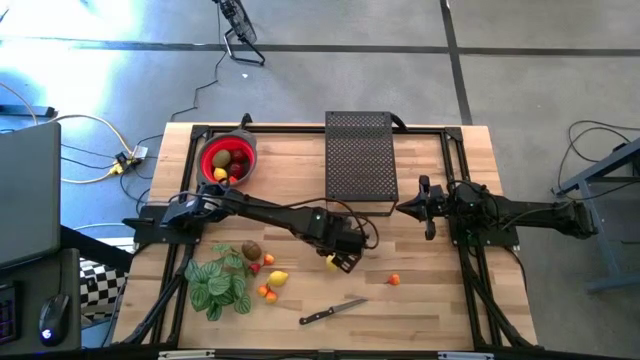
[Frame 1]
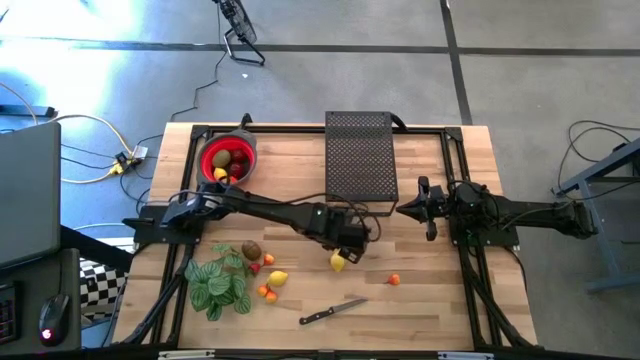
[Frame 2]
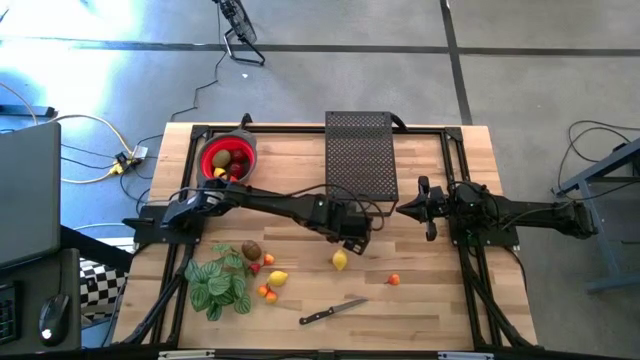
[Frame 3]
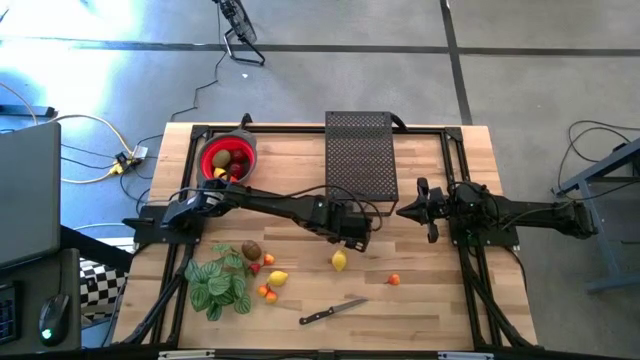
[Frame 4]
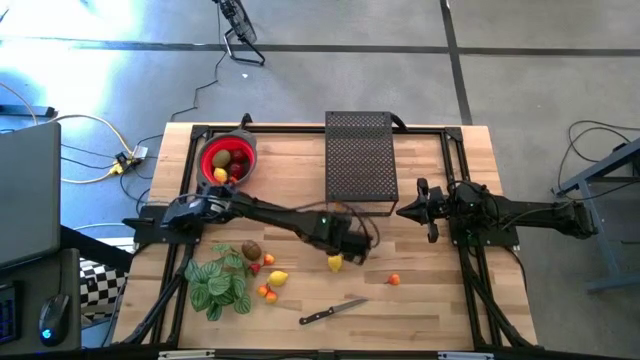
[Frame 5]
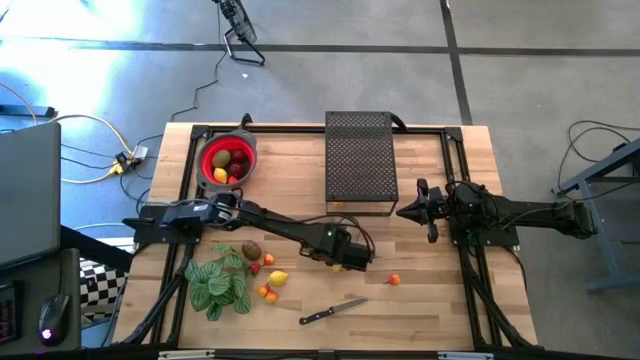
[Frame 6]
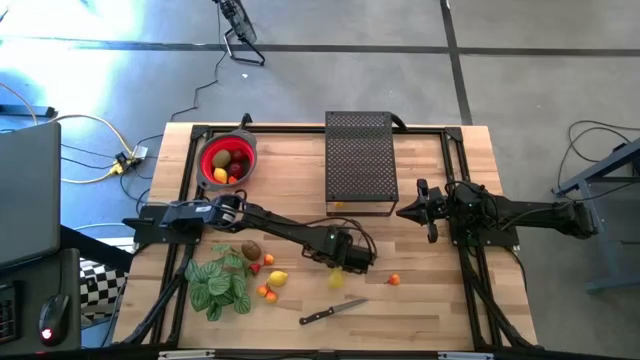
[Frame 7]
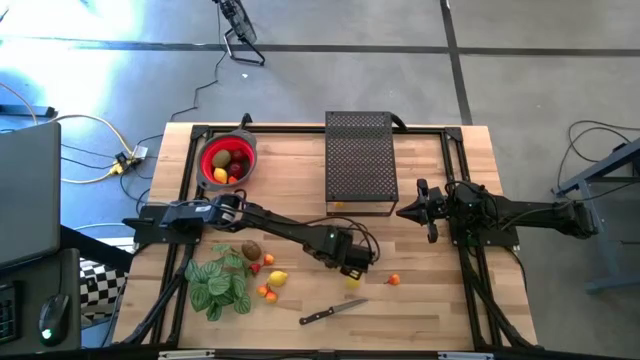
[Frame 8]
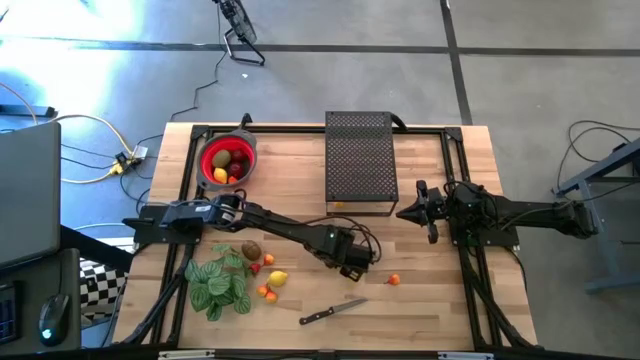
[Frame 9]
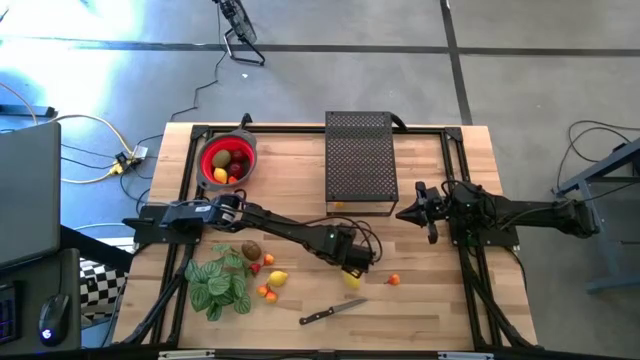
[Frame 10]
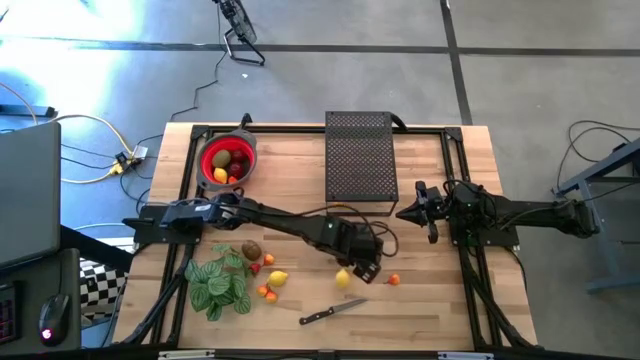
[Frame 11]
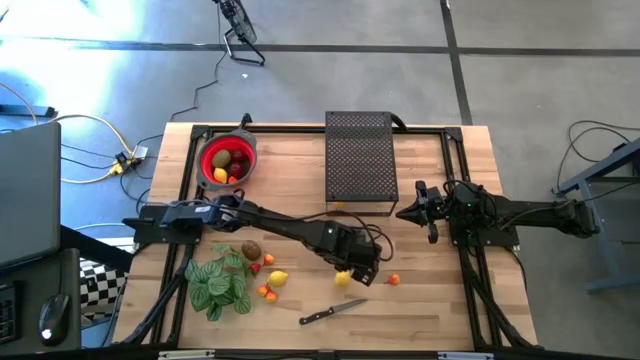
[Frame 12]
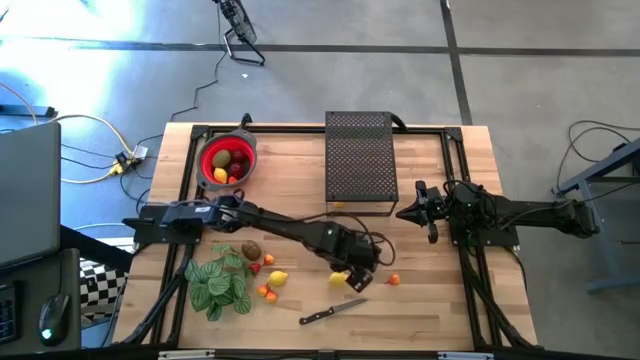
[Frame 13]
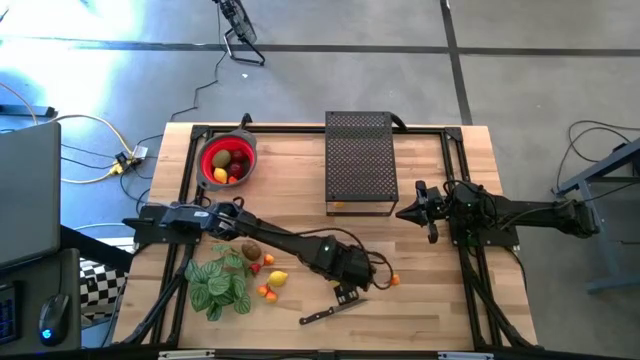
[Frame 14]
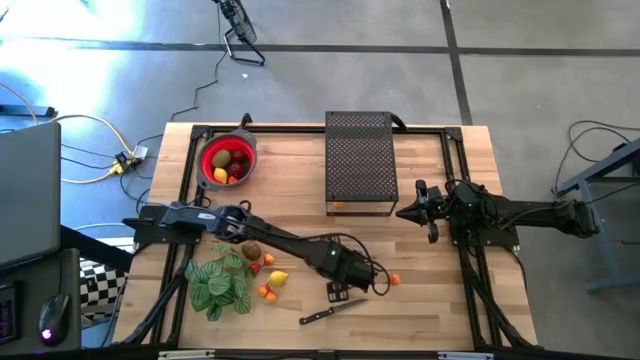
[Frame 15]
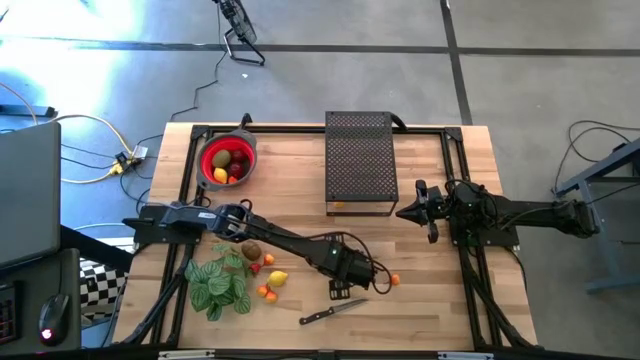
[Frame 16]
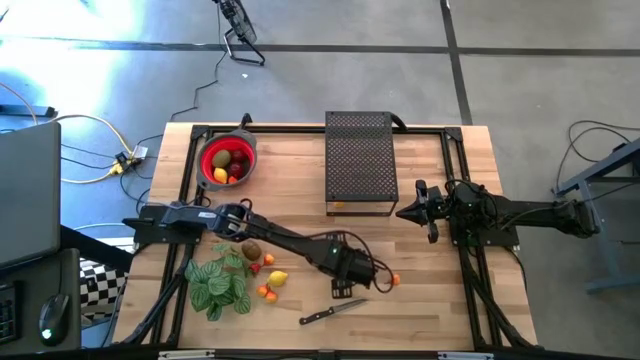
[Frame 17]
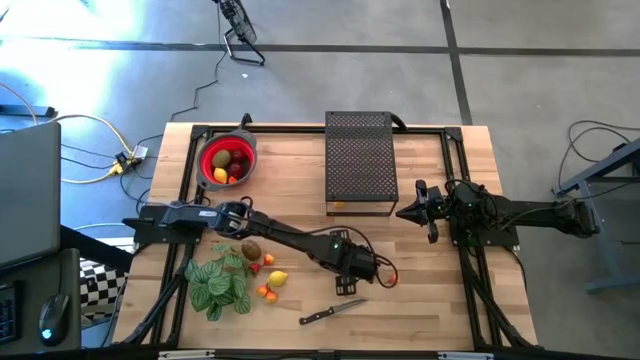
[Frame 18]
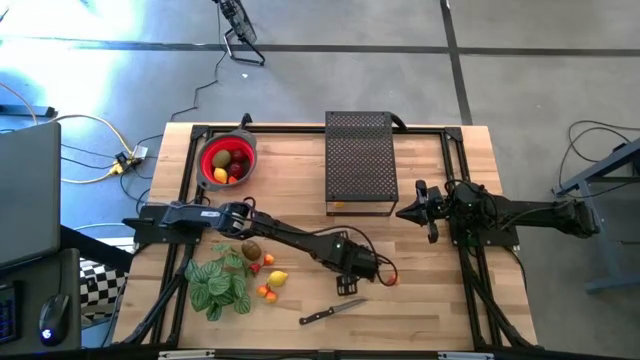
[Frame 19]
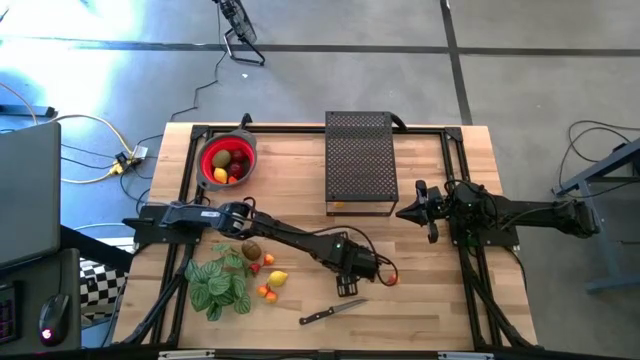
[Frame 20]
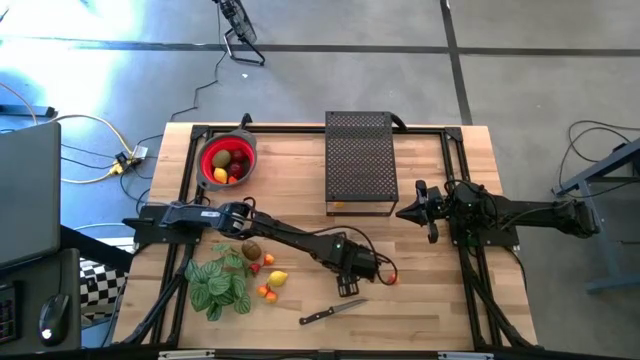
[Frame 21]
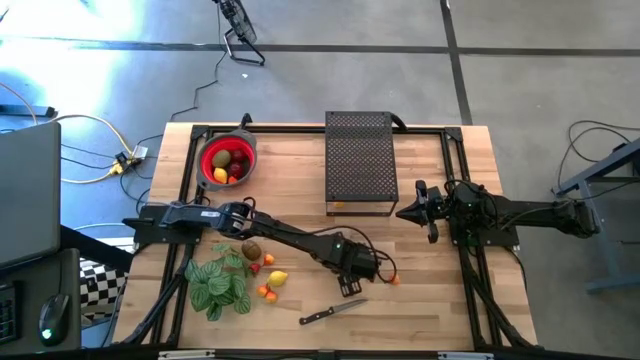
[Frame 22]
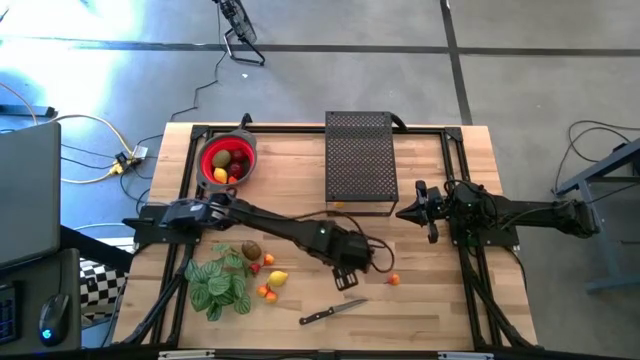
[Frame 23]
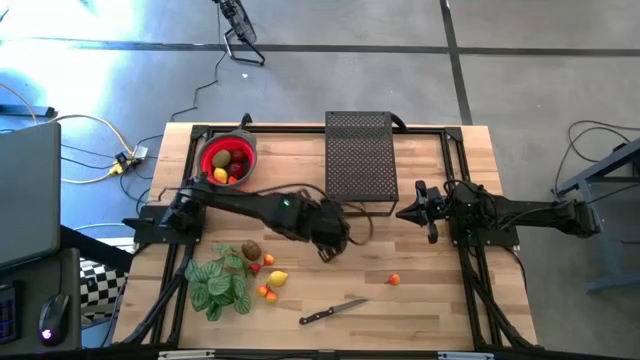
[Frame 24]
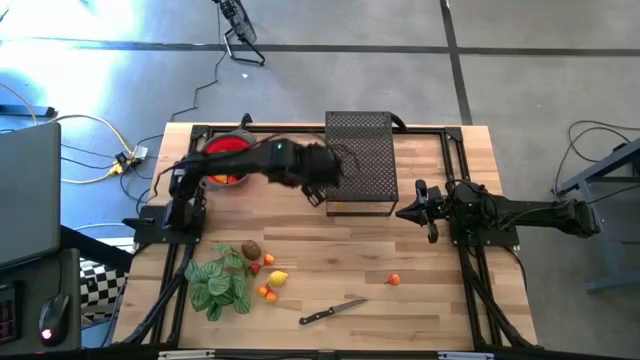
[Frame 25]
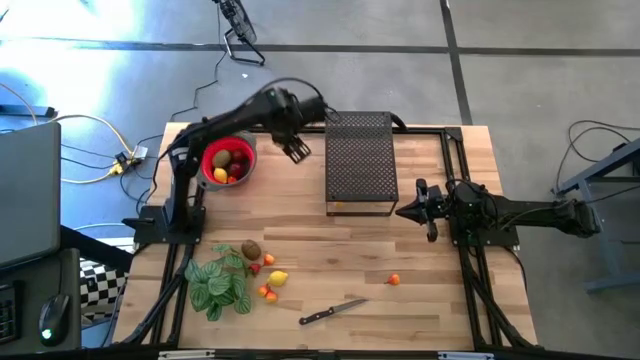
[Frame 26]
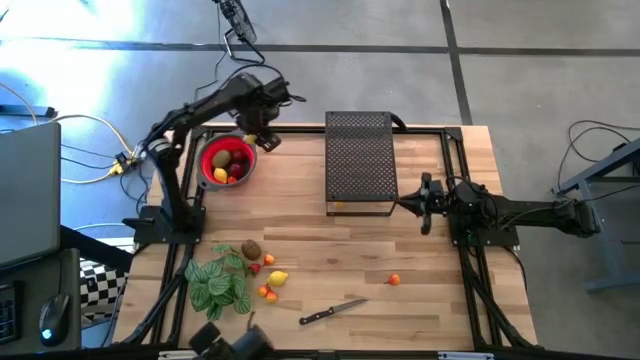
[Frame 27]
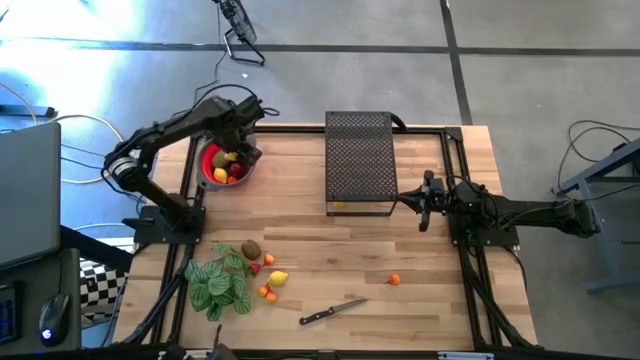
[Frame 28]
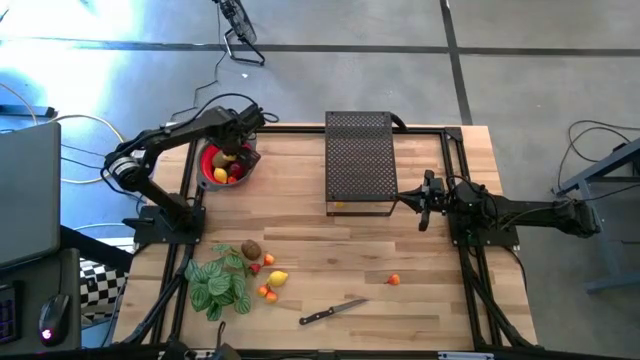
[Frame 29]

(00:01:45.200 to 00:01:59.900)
Task: Pick & Place Fruit
Put the top yellow lemon into the strainer bowl

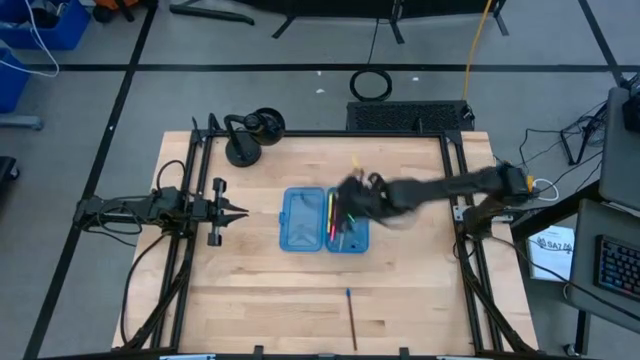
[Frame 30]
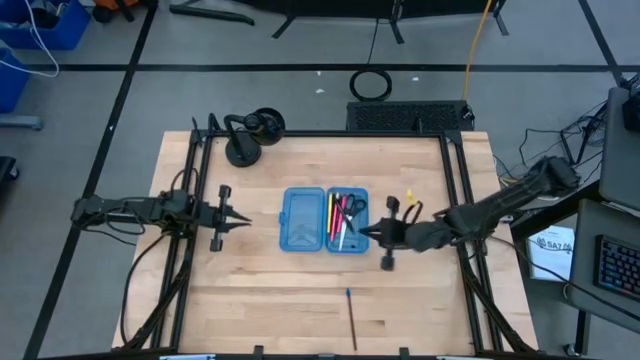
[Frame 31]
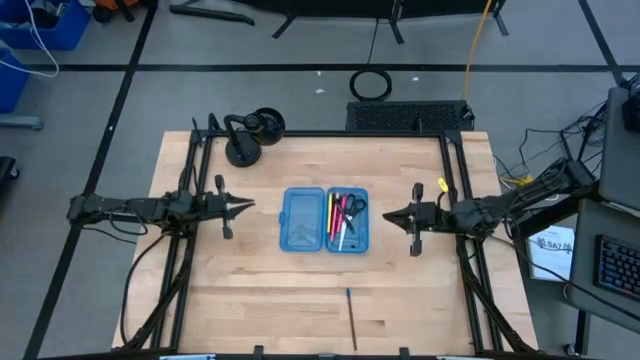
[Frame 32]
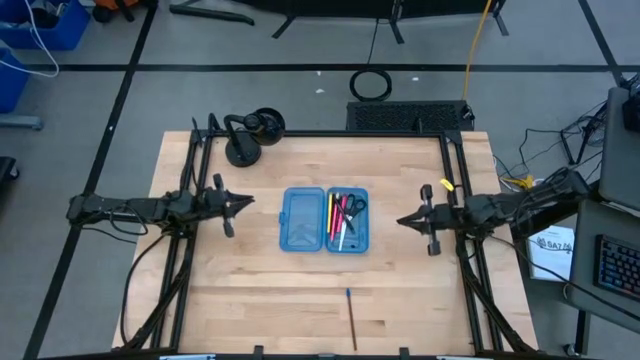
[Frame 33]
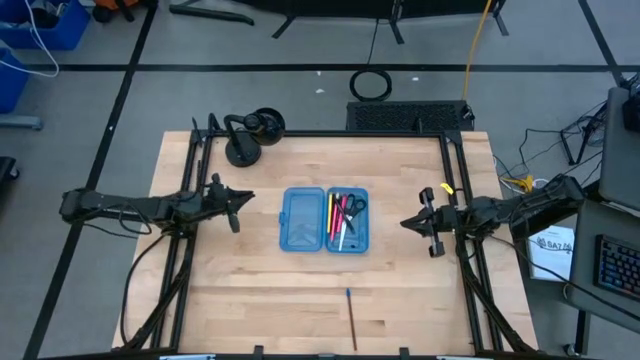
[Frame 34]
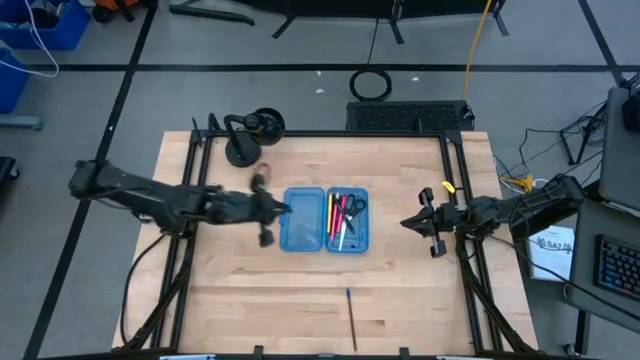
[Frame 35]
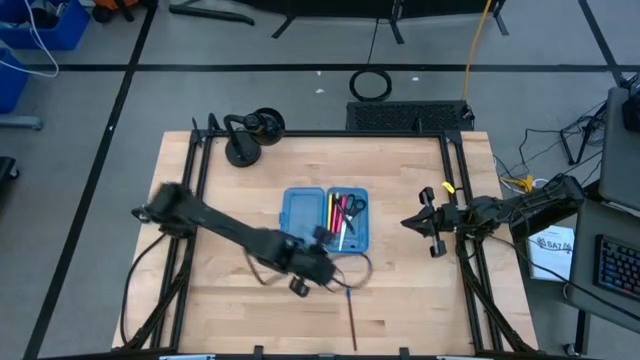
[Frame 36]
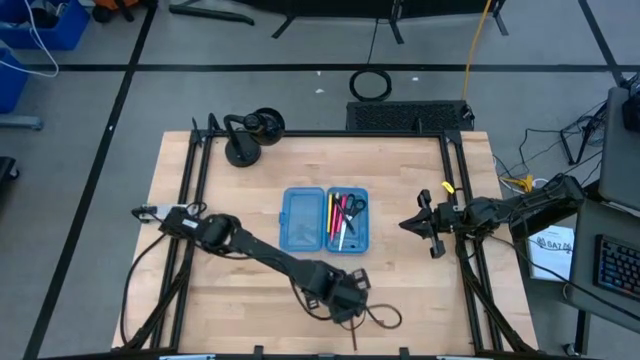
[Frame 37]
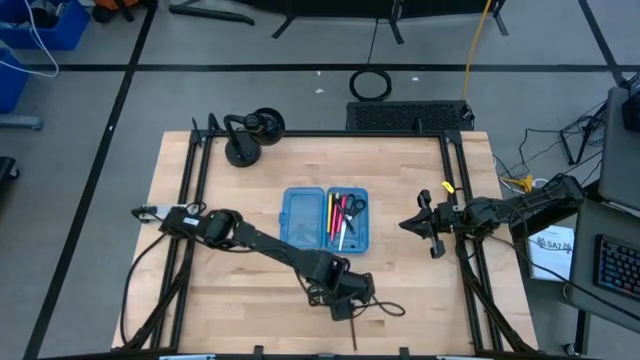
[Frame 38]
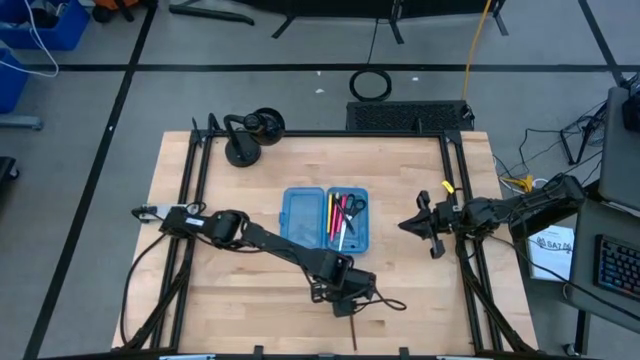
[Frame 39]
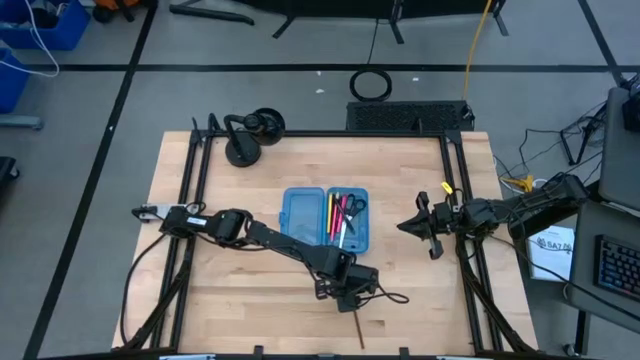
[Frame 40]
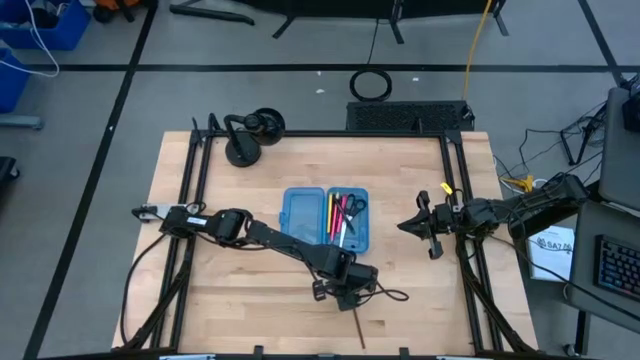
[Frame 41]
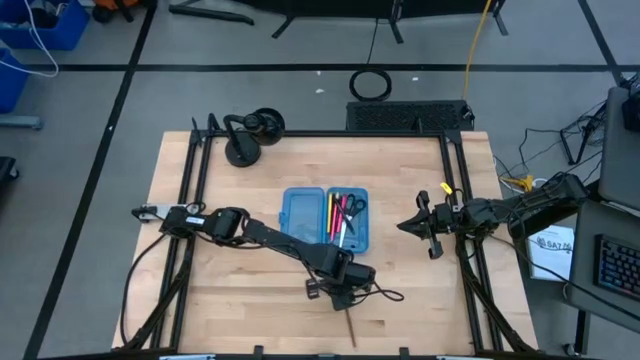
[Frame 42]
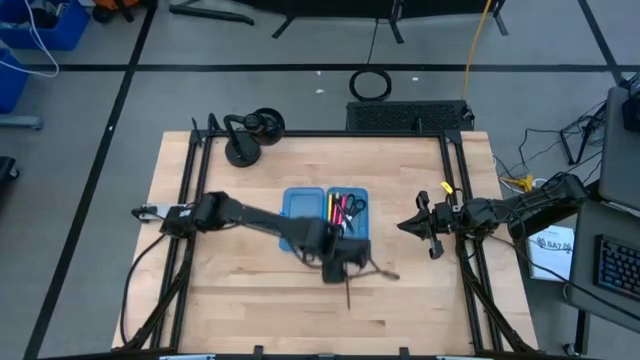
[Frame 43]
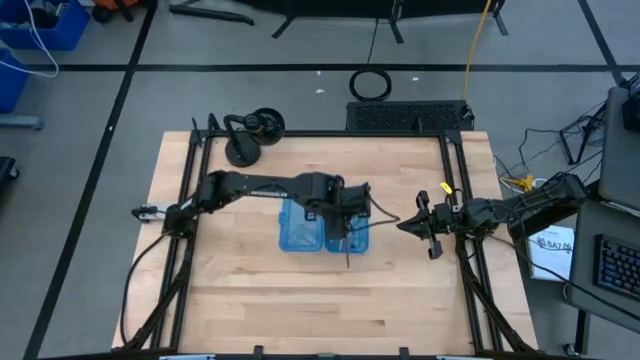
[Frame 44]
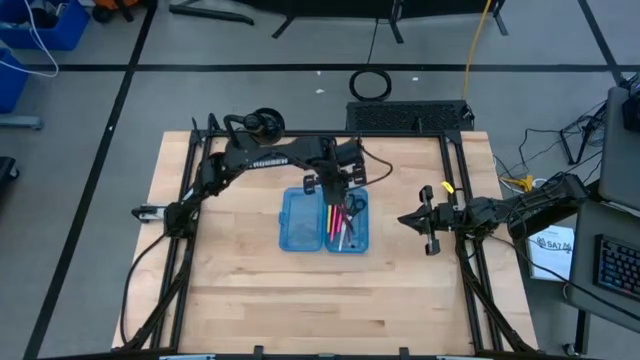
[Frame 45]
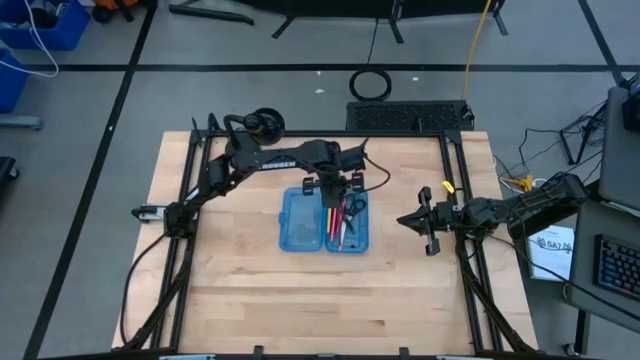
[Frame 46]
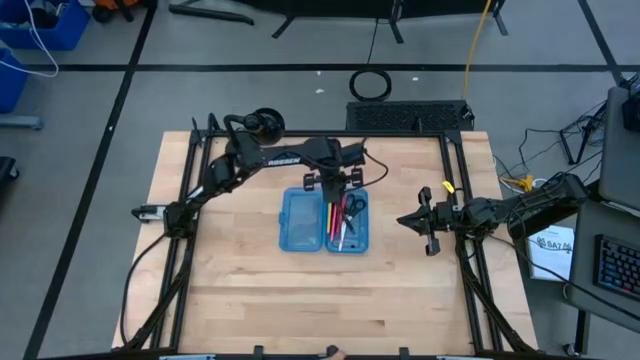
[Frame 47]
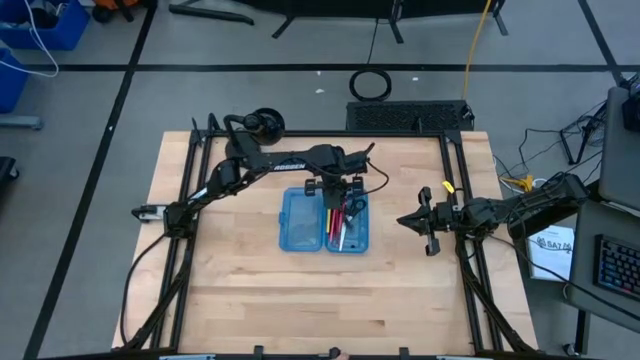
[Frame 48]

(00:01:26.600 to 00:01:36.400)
Task: Pick & place school supplies into a supply box
Put the brown pencil into the blue supply box
